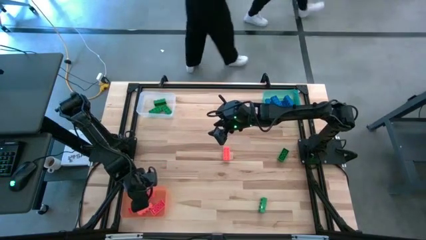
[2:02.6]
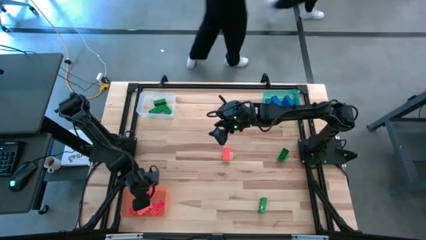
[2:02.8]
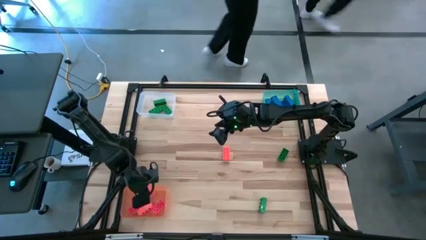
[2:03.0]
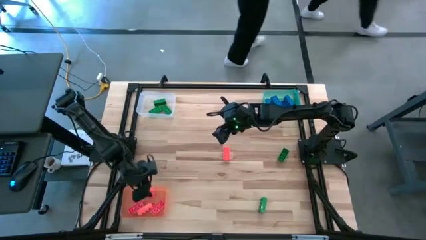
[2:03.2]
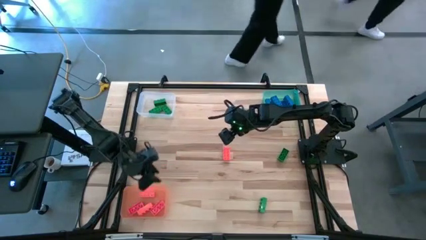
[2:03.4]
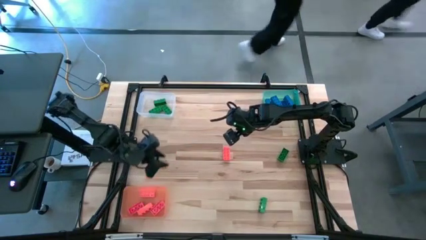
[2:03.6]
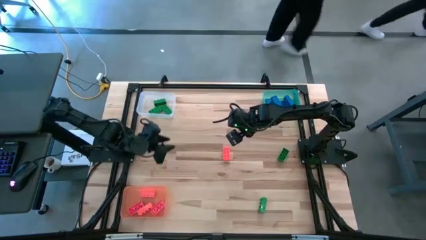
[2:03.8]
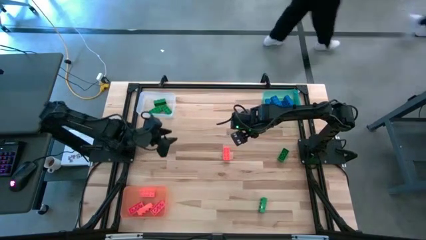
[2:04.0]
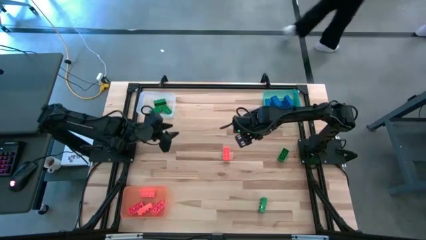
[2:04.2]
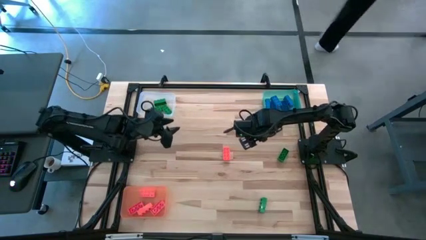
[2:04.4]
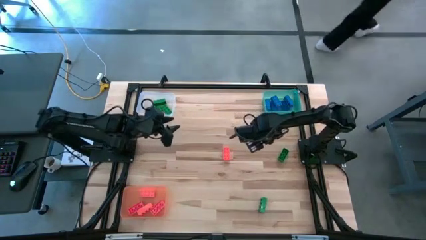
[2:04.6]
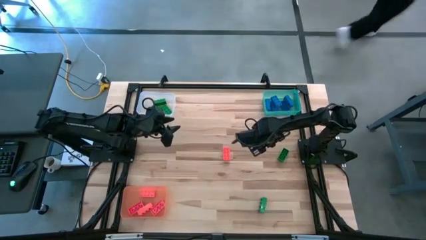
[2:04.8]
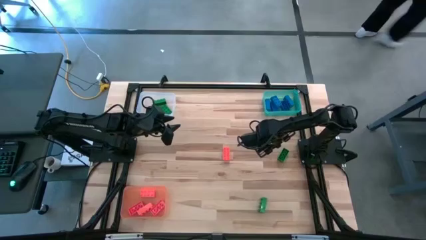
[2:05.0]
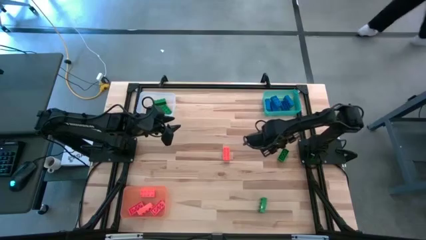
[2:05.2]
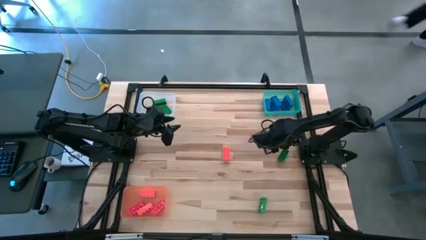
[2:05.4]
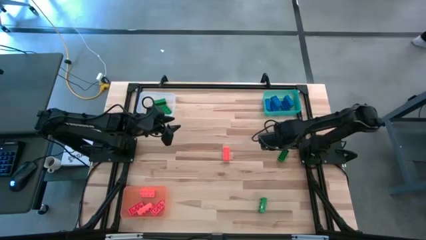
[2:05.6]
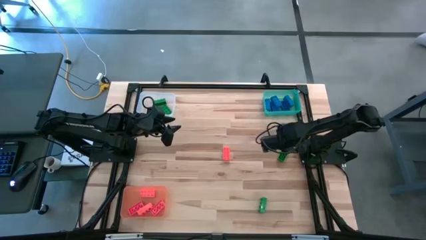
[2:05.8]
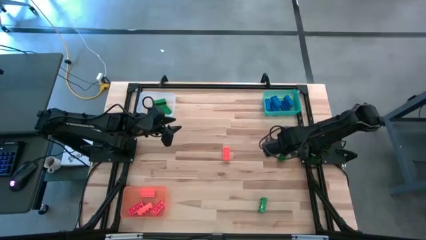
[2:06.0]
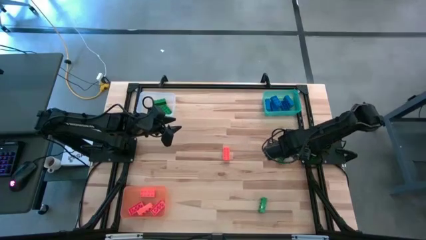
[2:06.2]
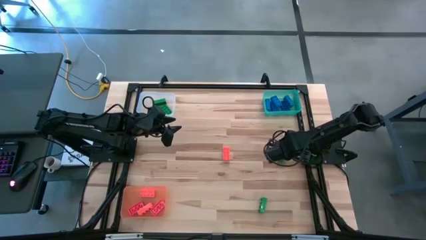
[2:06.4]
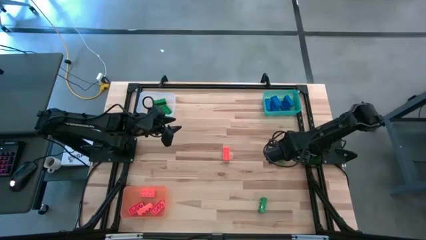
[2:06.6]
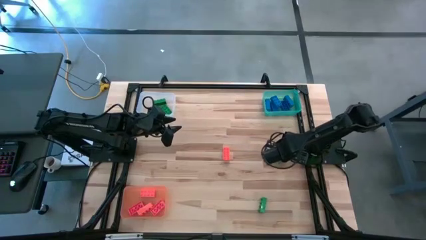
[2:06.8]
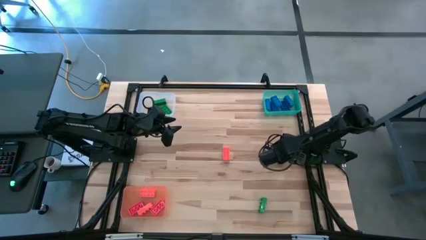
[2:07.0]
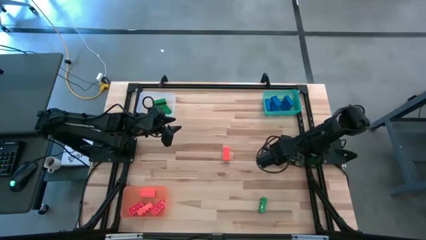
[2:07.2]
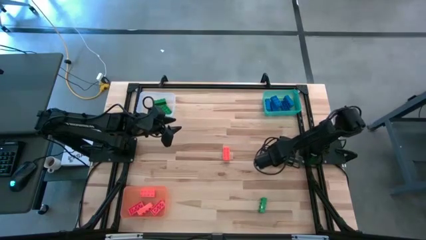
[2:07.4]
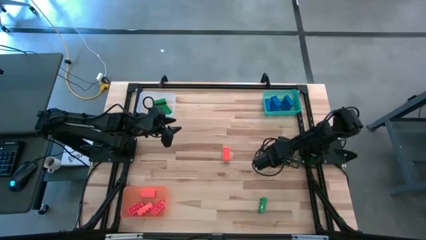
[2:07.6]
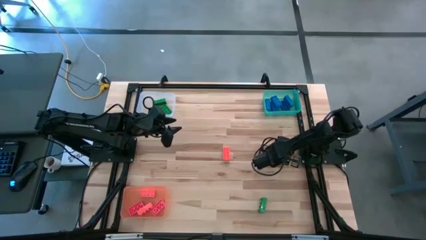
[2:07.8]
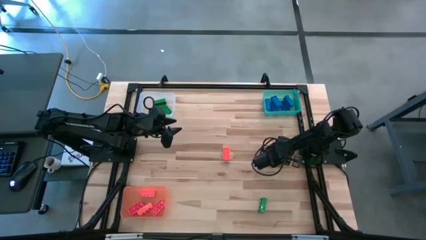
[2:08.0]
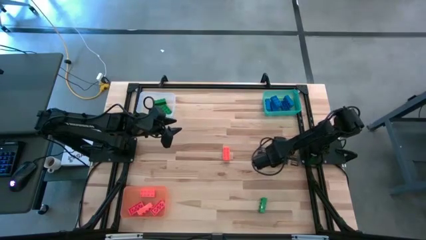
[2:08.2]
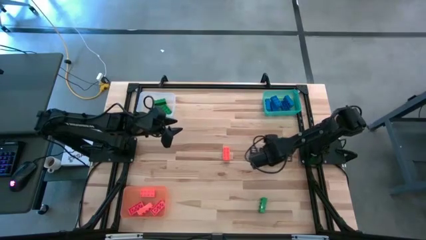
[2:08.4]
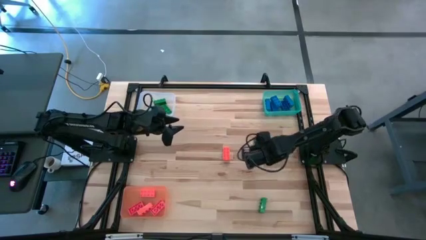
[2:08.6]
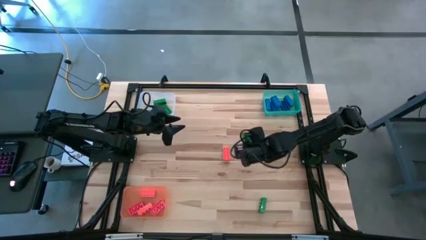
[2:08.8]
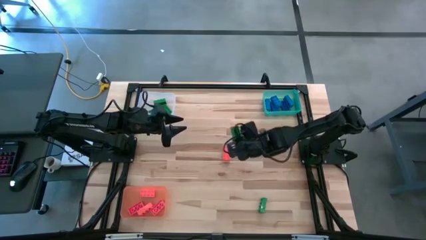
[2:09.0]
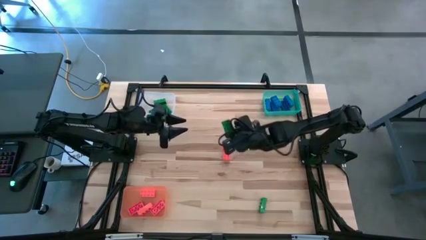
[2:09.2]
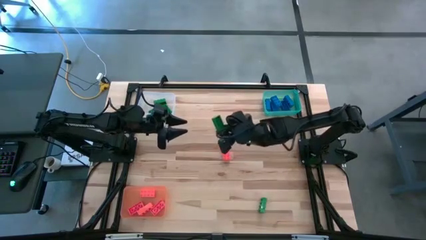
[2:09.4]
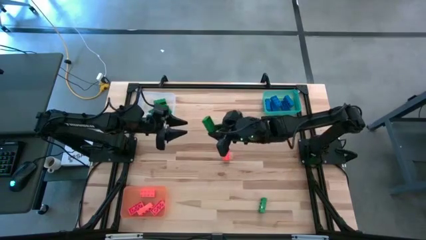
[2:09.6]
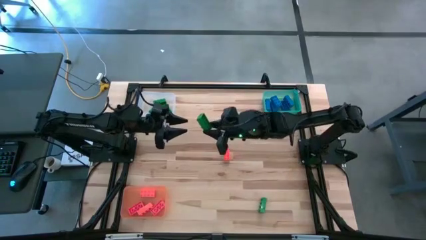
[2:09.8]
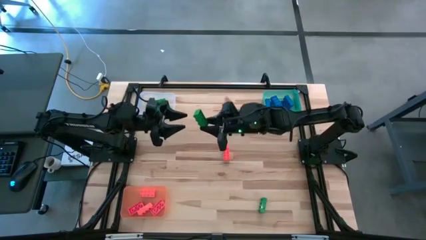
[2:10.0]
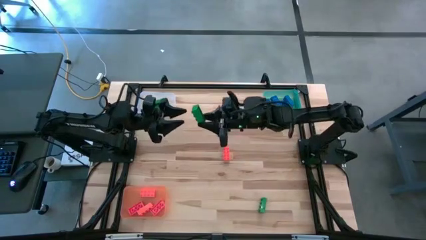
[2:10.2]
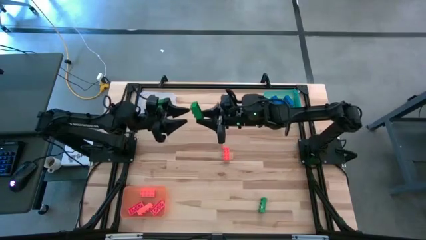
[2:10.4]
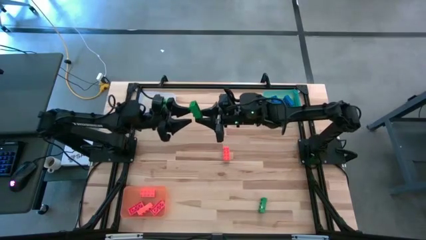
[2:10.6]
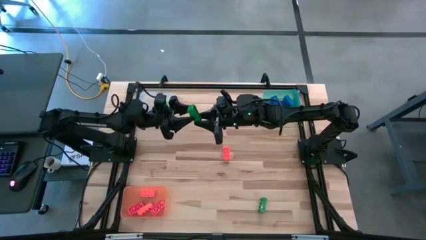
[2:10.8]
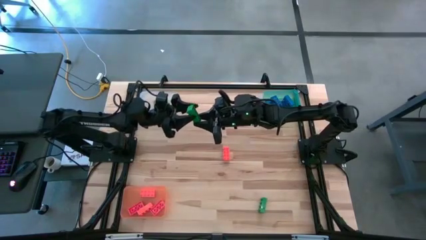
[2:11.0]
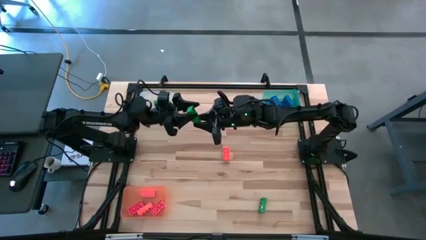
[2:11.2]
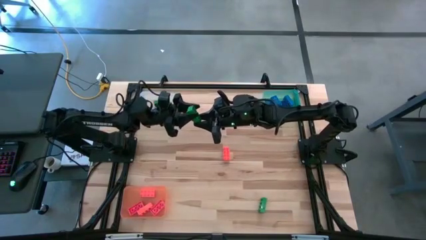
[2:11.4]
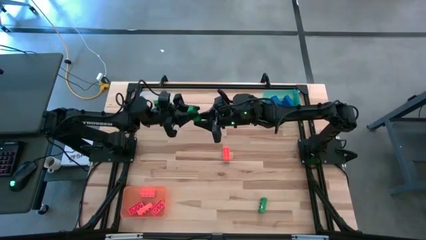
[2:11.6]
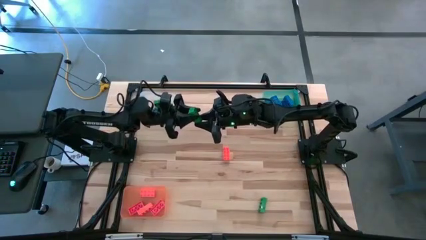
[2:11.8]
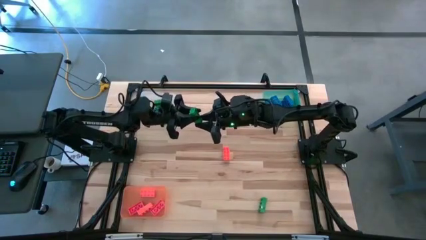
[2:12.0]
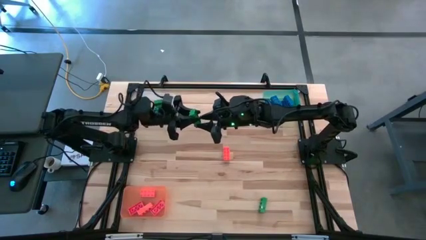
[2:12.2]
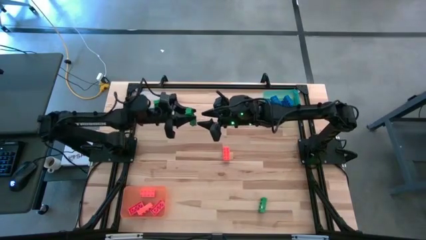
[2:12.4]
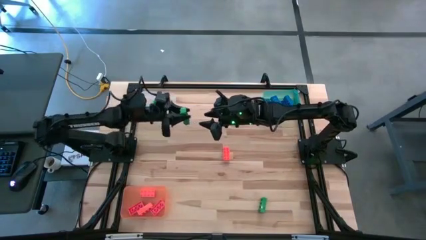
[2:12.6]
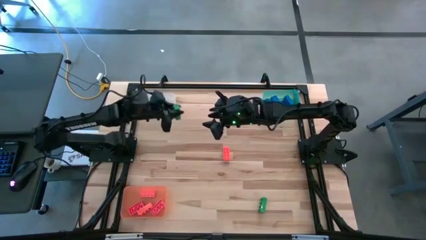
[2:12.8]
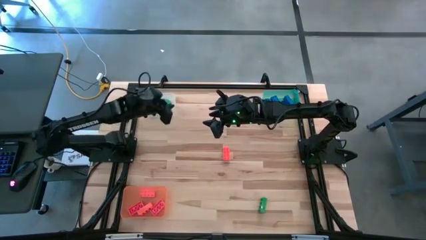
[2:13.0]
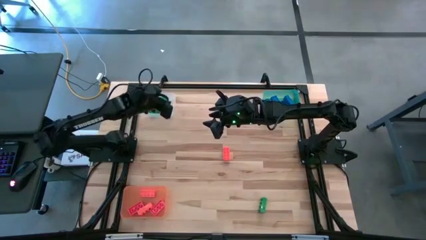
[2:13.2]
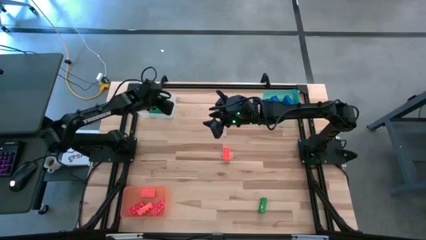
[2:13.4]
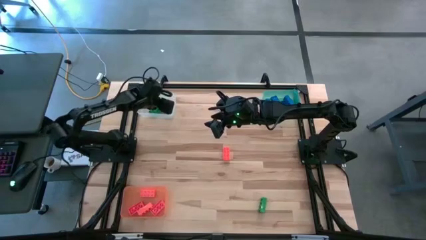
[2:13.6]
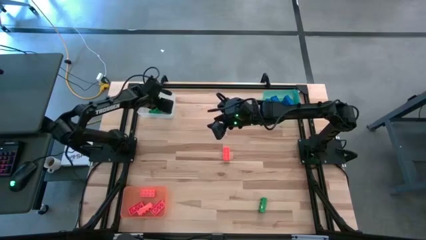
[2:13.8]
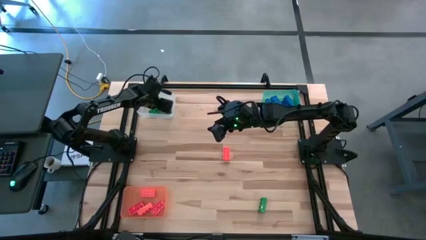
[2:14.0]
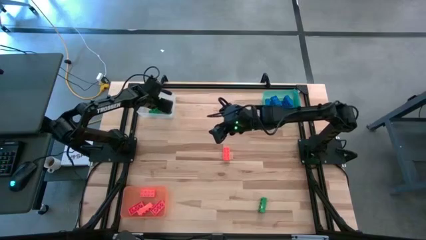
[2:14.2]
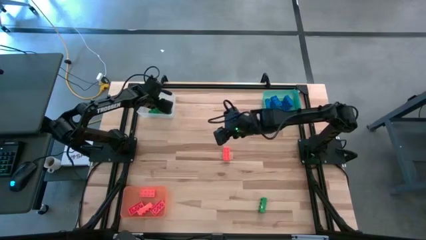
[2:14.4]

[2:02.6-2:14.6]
Task: Sort & place blocks by color
Put the green game piece into the white bin
